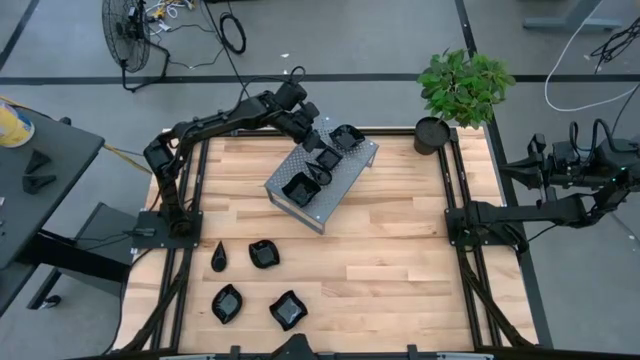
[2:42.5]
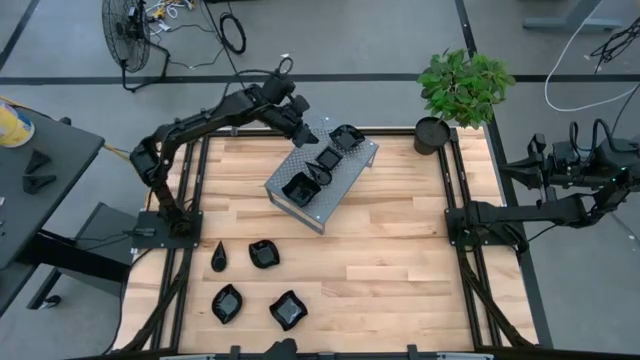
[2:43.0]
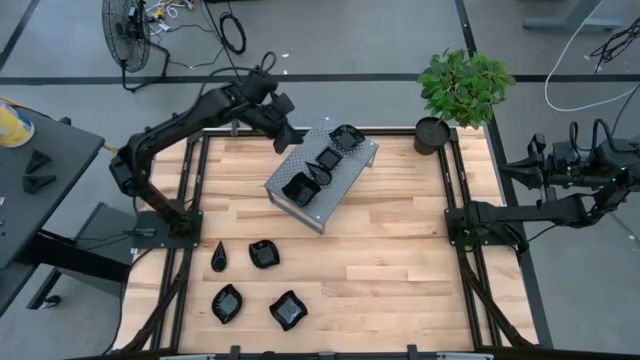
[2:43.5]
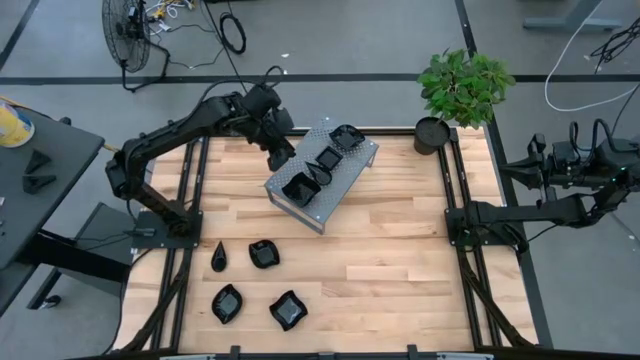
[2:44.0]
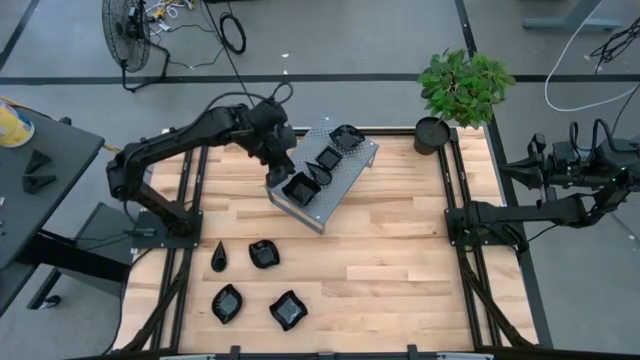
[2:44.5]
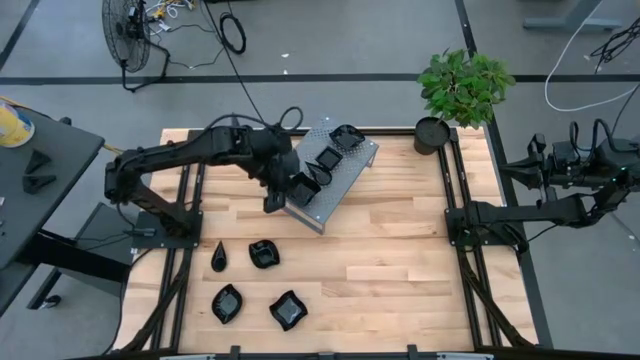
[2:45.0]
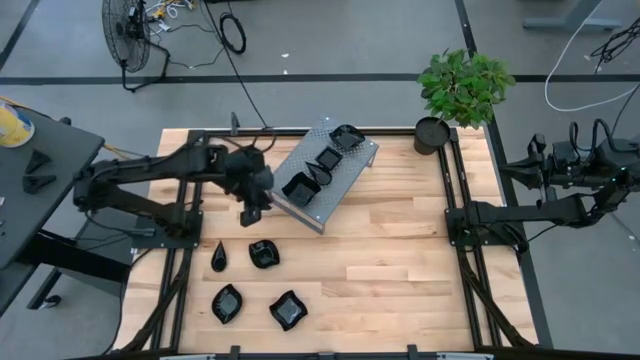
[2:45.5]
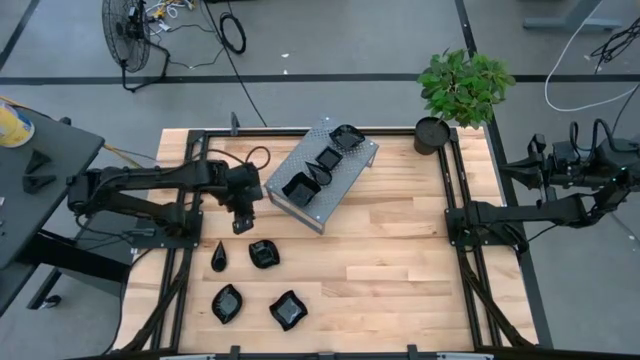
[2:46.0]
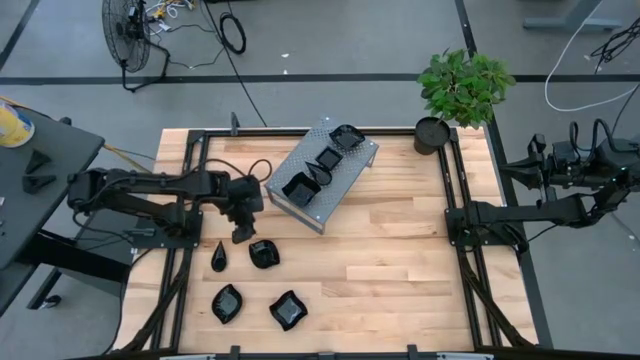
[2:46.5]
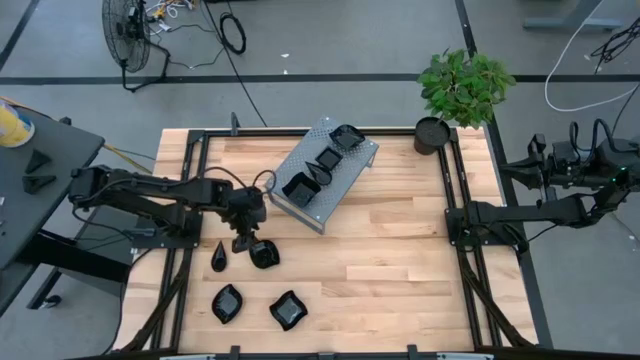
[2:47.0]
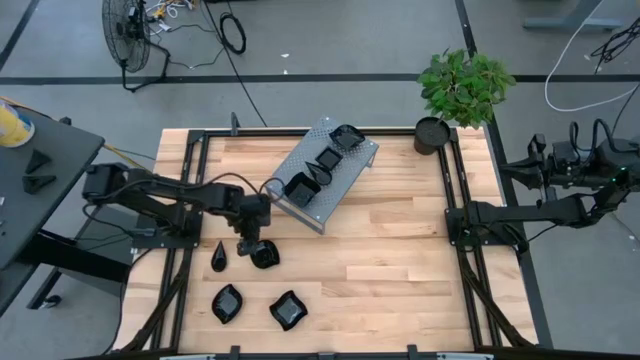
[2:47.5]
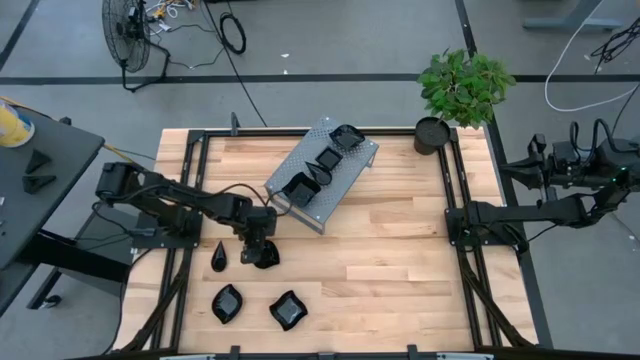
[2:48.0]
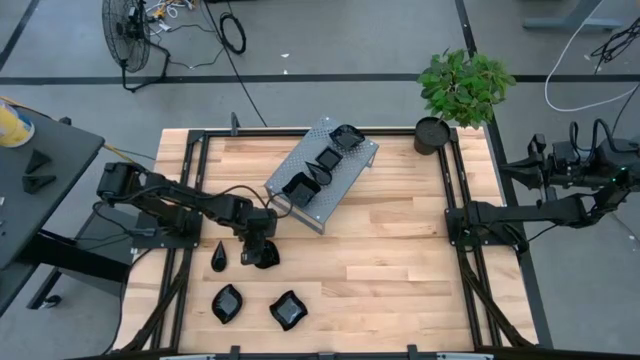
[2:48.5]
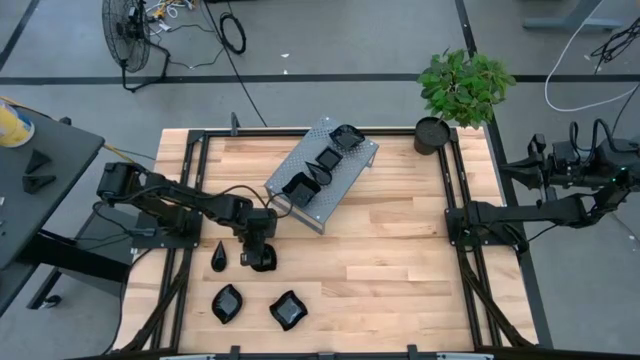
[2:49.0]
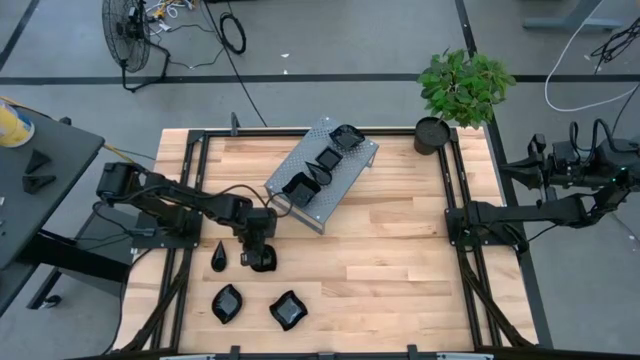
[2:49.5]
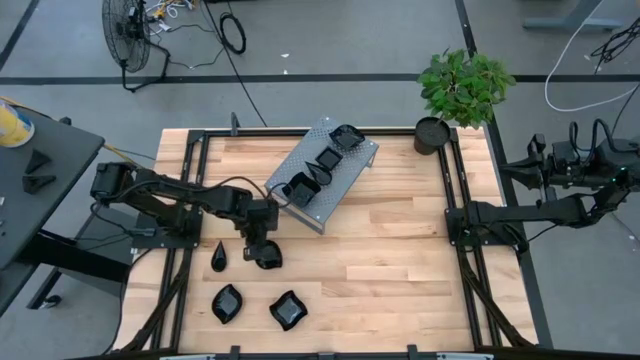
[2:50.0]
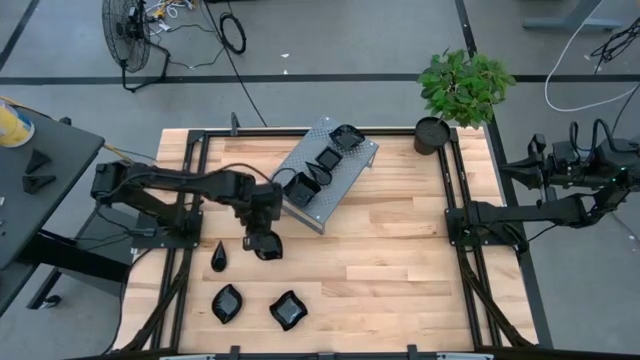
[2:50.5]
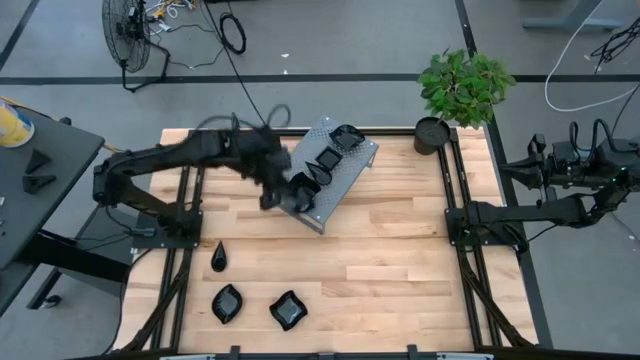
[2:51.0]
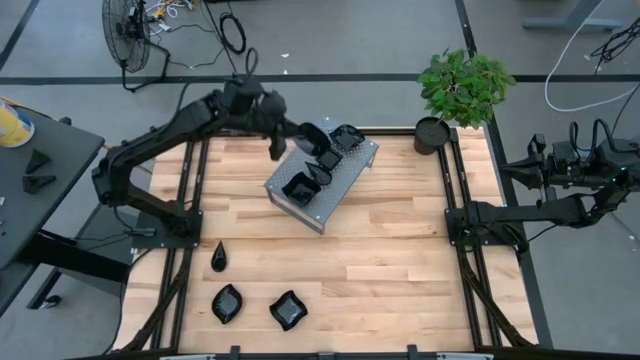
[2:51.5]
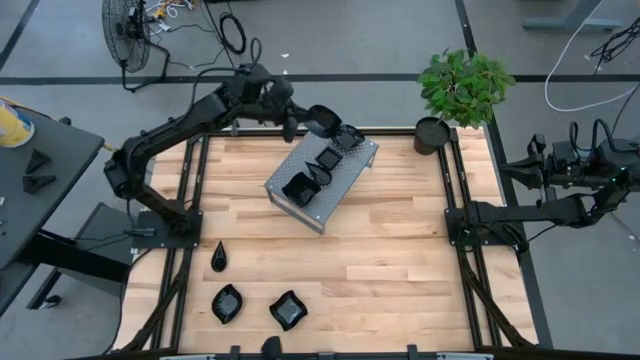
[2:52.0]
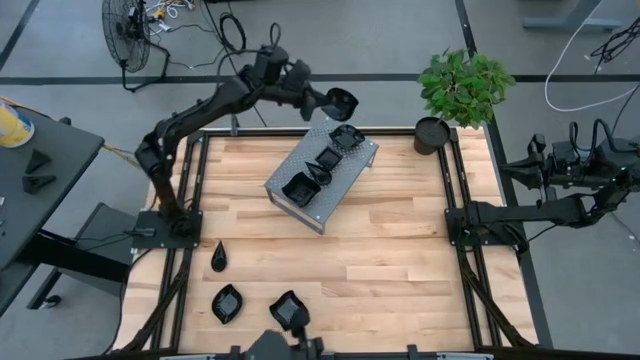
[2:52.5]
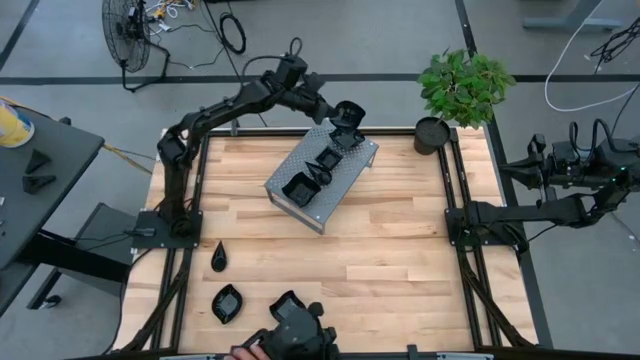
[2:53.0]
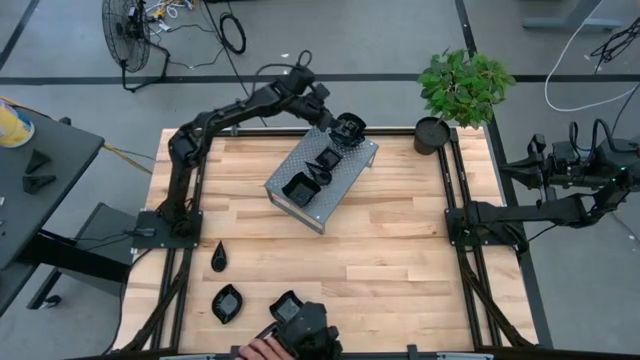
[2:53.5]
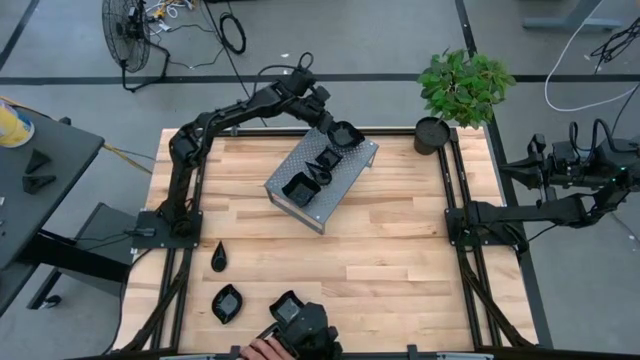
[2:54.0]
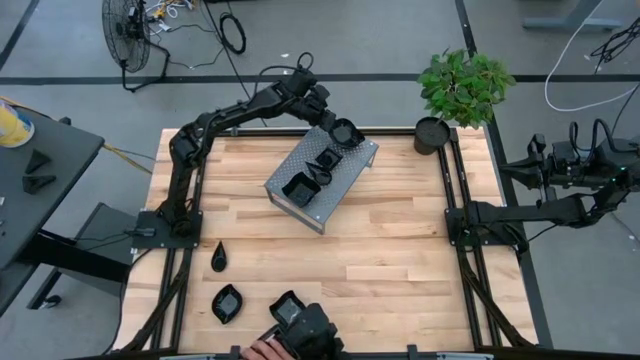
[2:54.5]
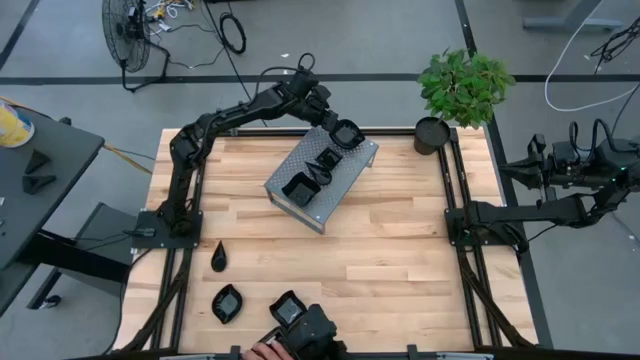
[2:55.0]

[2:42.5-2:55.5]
Task: Pick & Place Mini shaped plates
Stack the black leaf shaped plate on top of the black leaf shaped plate on the shelf

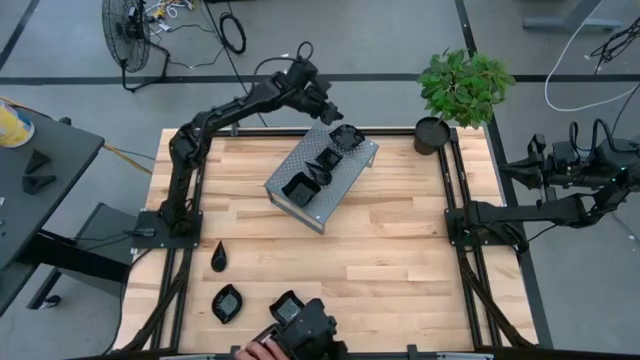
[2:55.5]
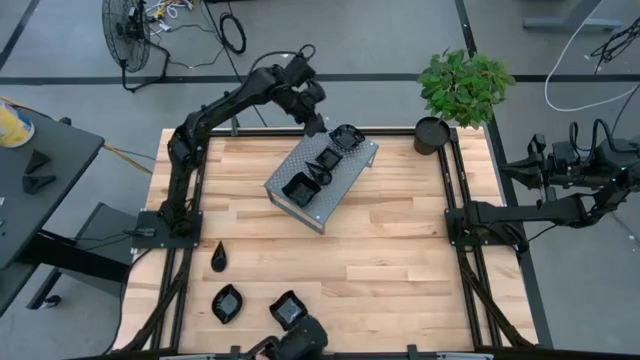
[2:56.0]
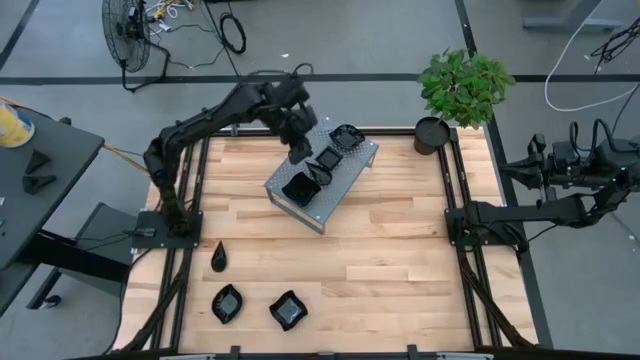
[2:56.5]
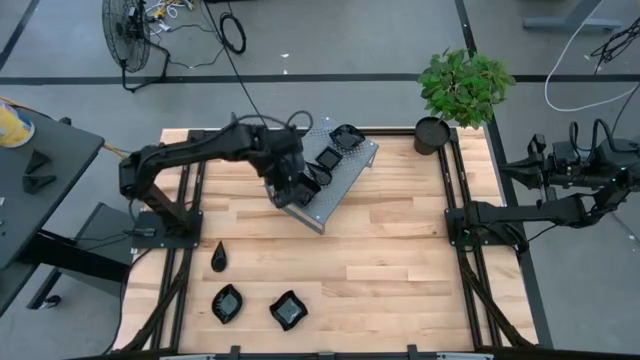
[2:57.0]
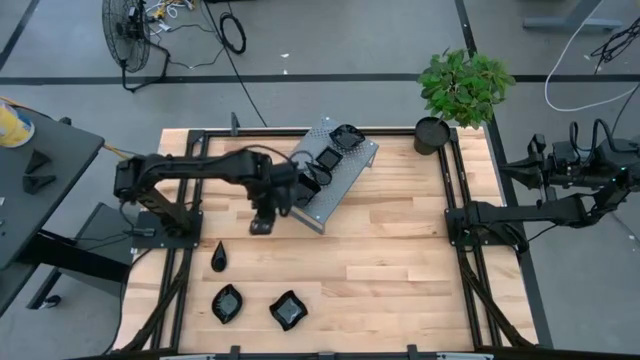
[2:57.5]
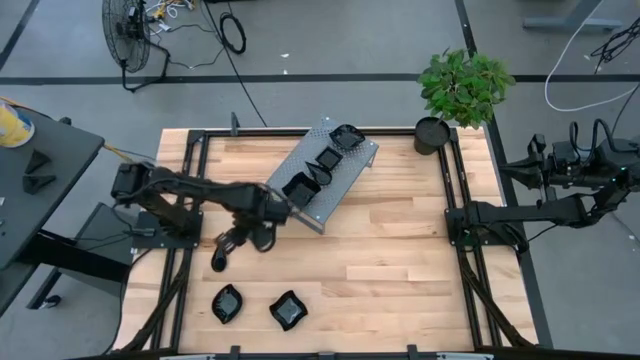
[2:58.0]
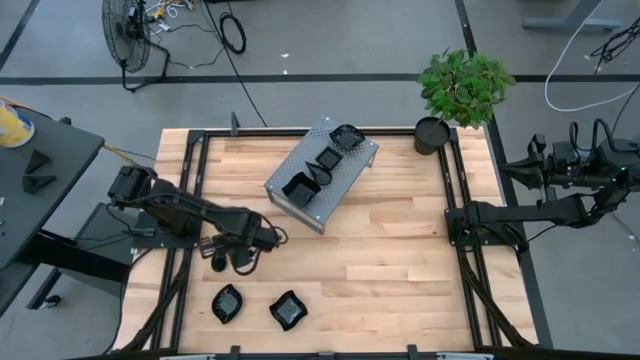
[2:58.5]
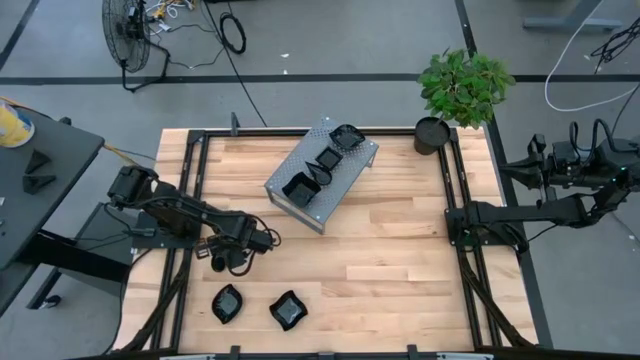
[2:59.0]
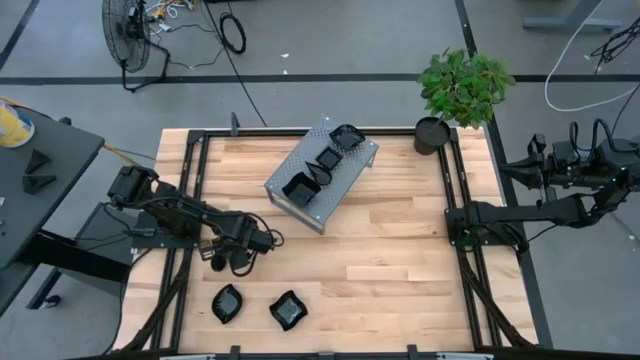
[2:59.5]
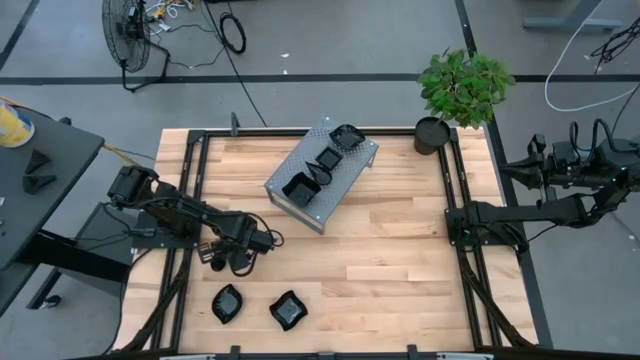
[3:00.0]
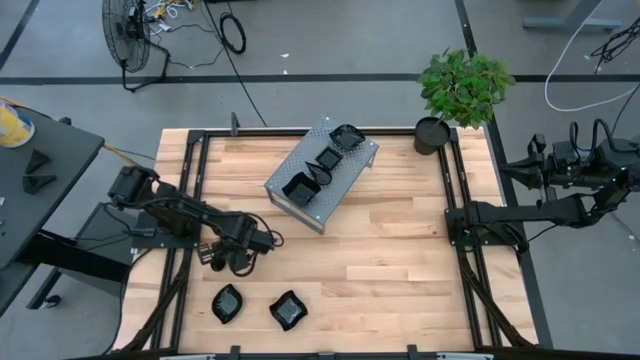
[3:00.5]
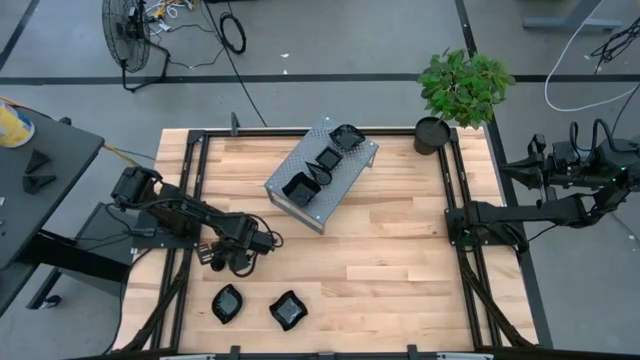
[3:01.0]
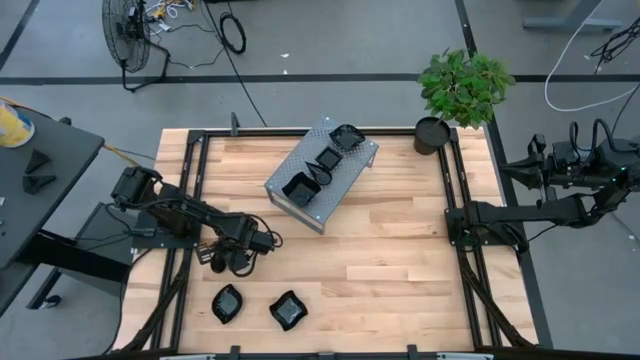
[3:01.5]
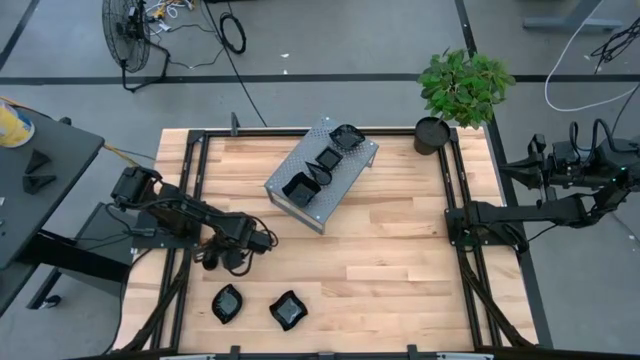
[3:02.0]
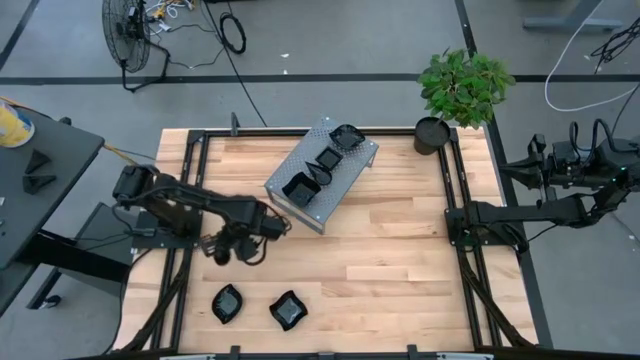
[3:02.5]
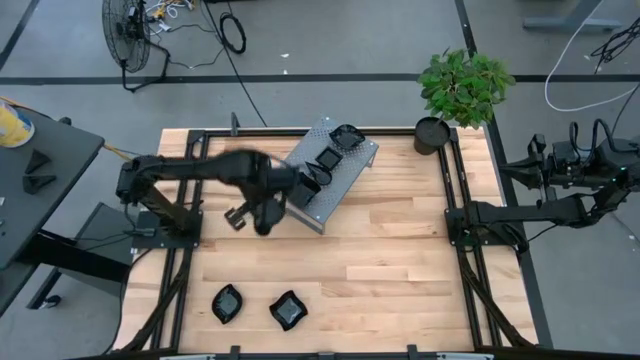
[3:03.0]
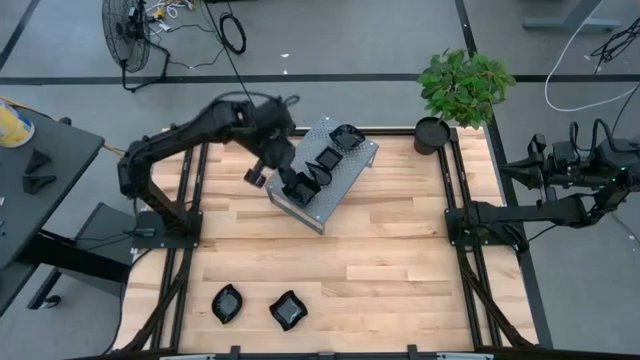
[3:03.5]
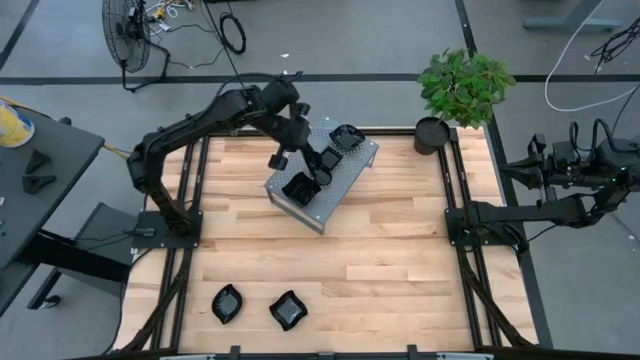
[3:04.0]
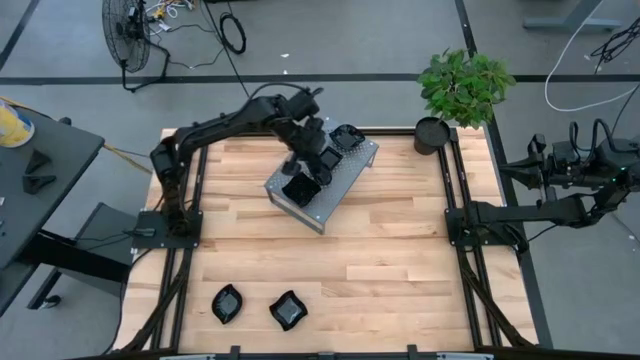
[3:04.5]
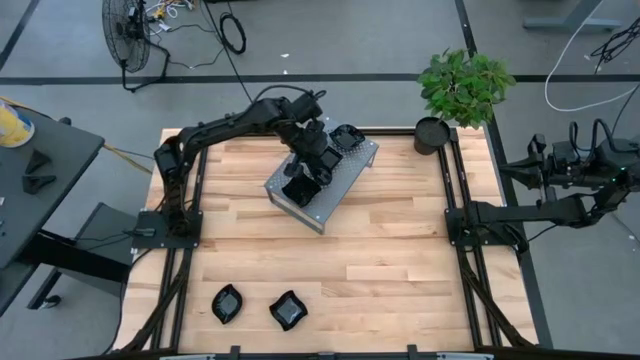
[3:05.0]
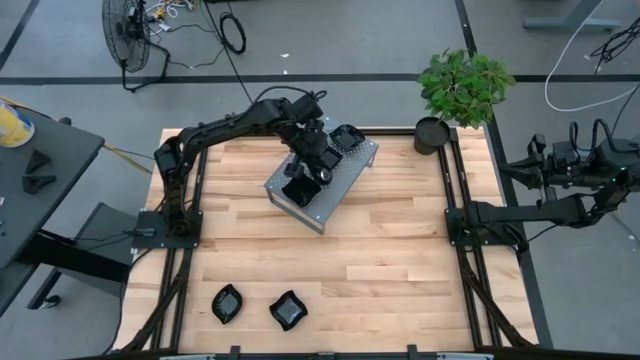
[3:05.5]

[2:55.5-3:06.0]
Stack the black drop shaped plate on top of the black drop shaped plate on the shelf
